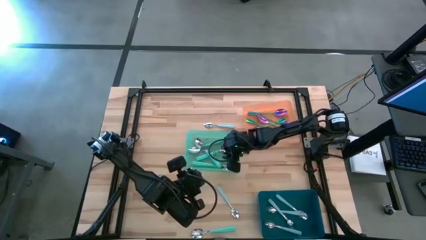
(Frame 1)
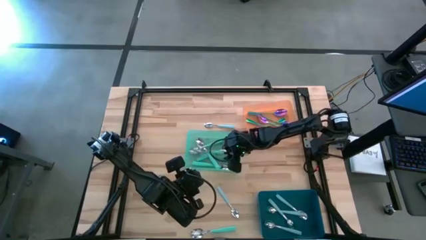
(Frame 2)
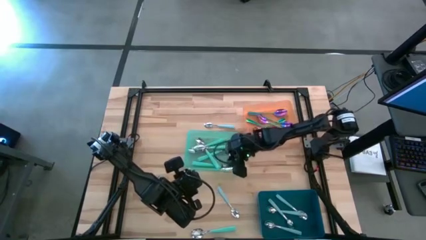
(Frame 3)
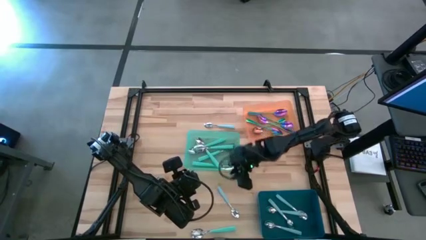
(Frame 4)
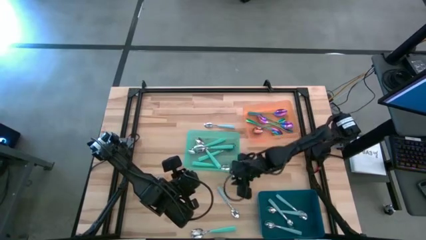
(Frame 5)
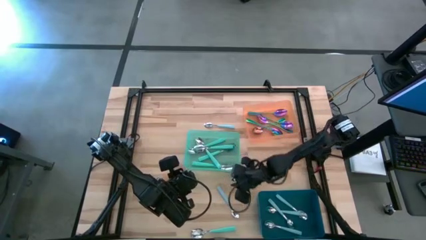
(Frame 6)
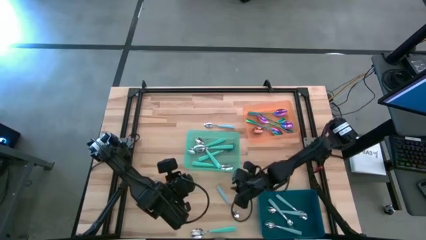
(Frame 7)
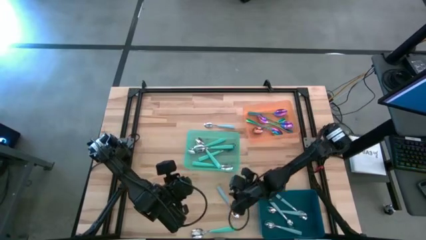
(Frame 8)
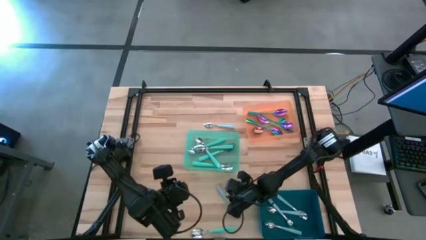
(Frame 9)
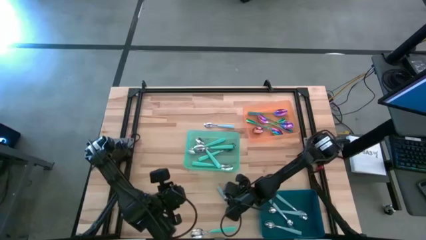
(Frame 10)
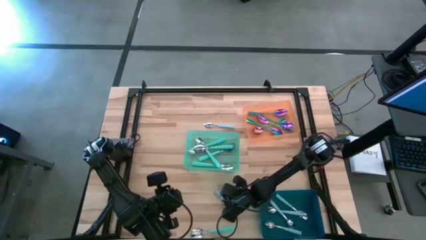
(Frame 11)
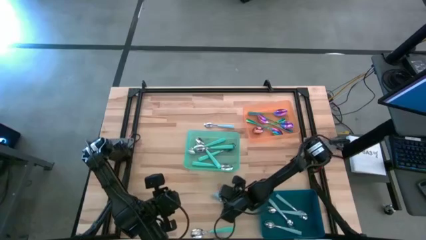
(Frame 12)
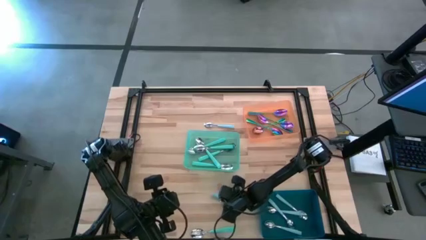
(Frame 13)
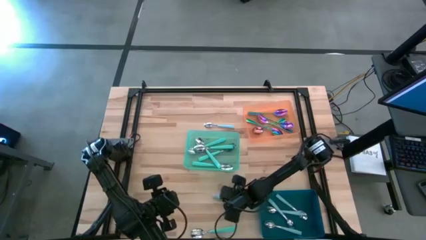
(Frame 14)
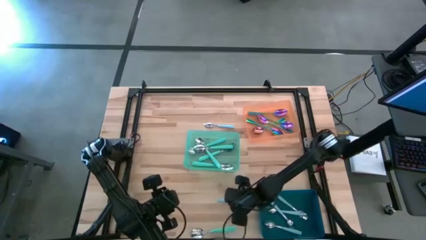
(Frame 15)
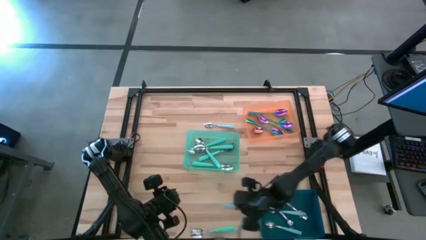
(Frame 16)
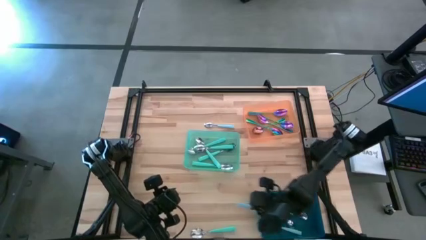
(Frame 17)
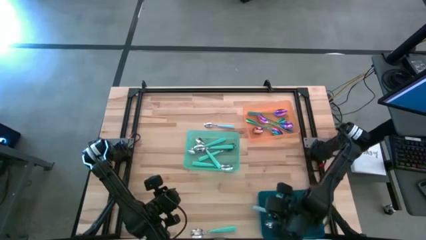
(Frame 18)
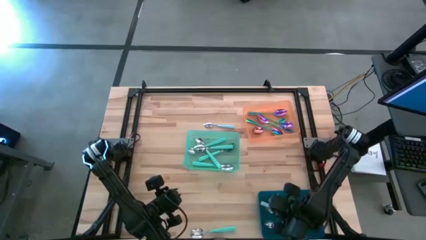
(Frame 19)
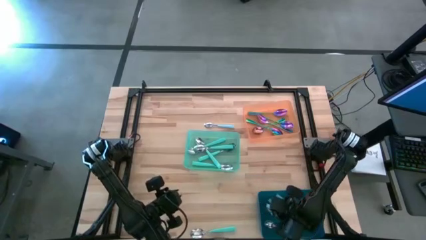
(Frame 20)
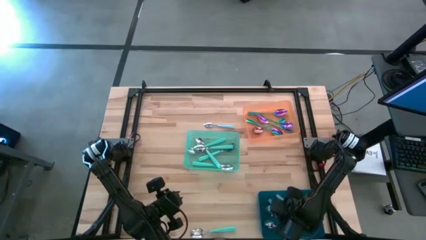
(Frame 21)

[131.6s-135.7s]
Task: Sort silverware by color (type)
Put the blue spoon into the blue bin

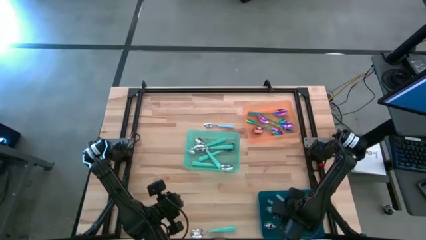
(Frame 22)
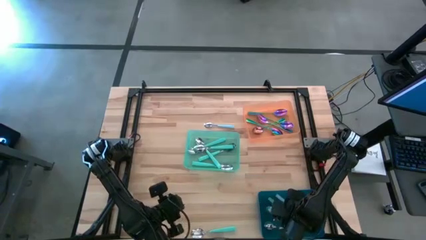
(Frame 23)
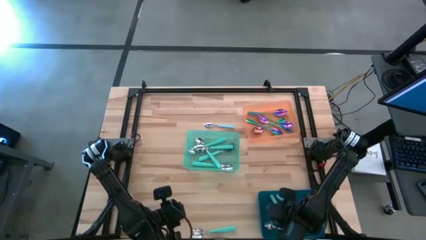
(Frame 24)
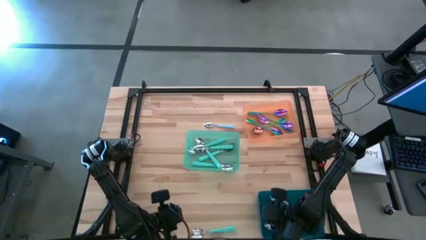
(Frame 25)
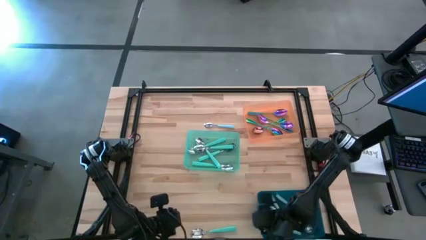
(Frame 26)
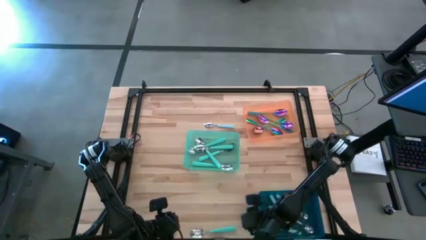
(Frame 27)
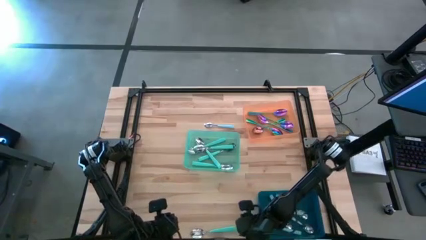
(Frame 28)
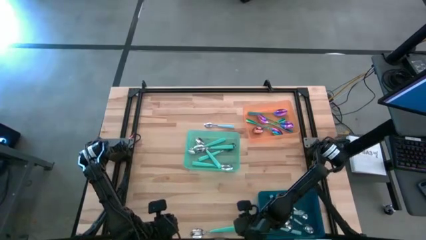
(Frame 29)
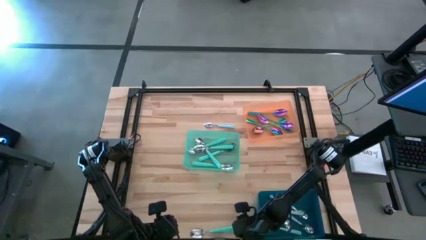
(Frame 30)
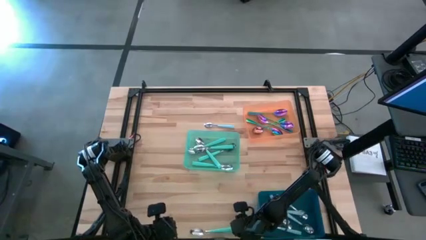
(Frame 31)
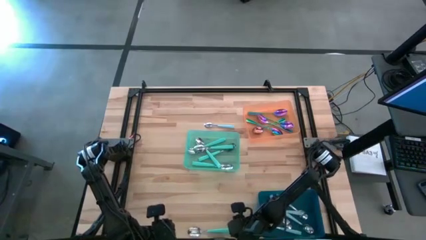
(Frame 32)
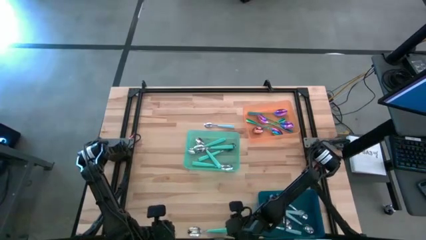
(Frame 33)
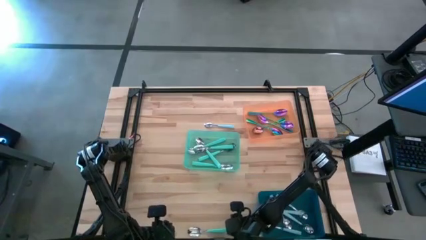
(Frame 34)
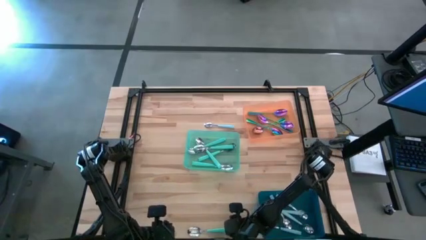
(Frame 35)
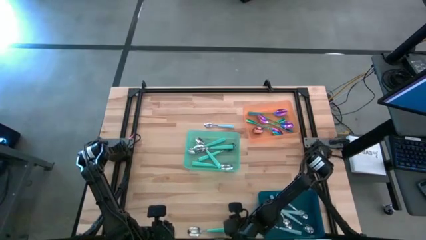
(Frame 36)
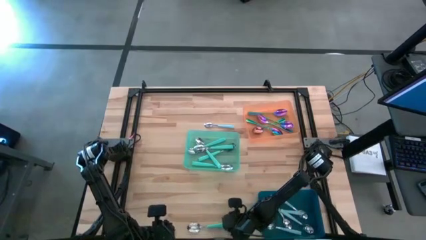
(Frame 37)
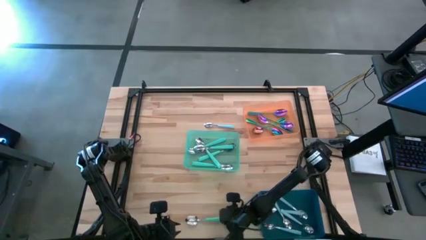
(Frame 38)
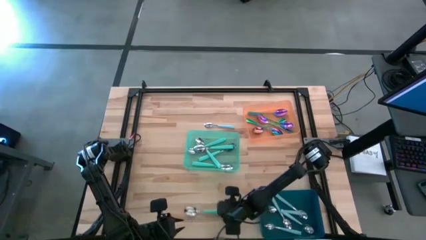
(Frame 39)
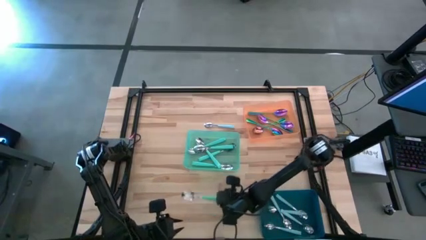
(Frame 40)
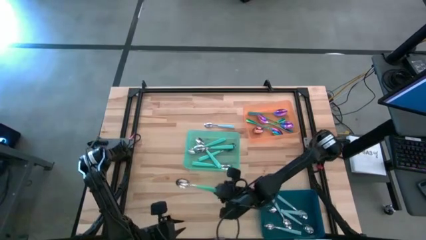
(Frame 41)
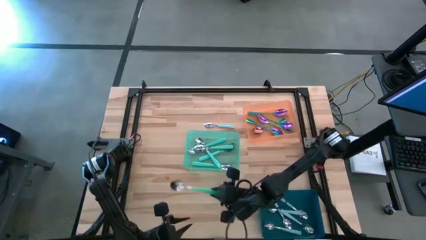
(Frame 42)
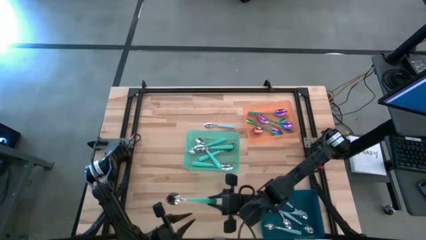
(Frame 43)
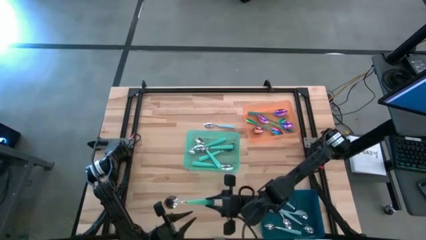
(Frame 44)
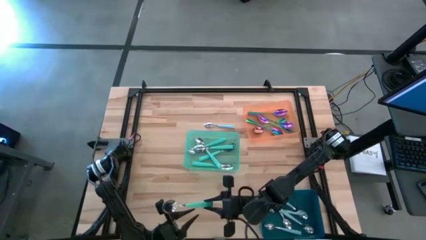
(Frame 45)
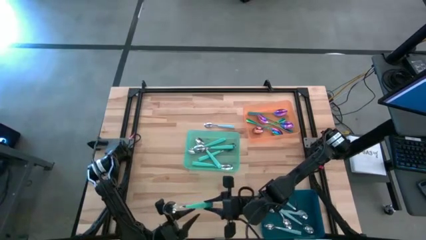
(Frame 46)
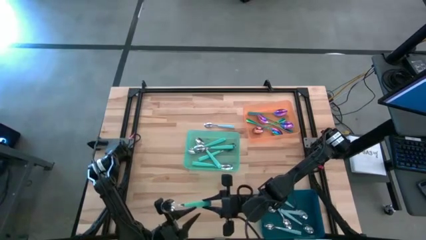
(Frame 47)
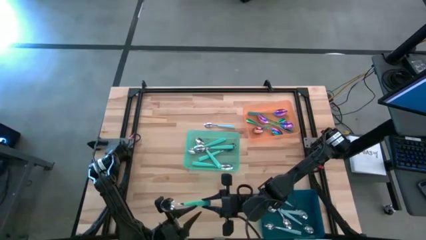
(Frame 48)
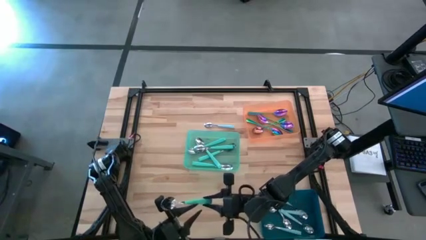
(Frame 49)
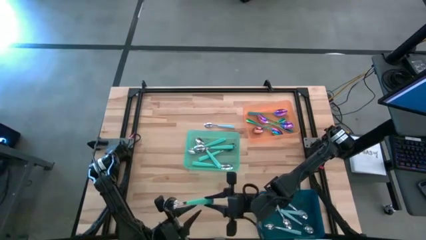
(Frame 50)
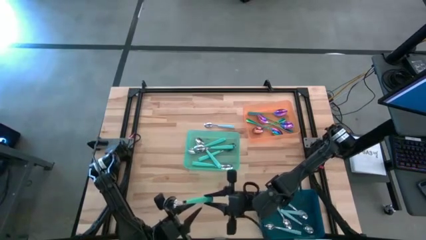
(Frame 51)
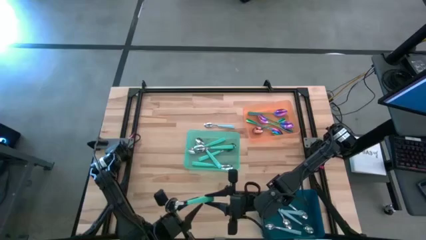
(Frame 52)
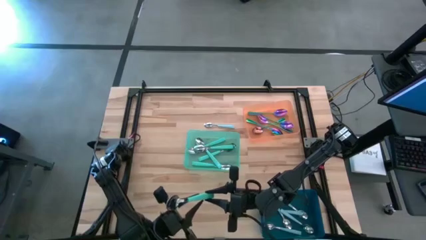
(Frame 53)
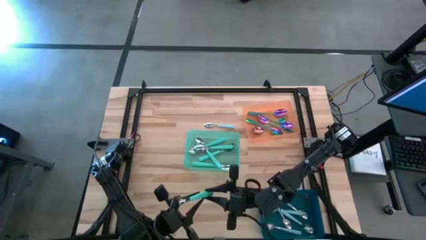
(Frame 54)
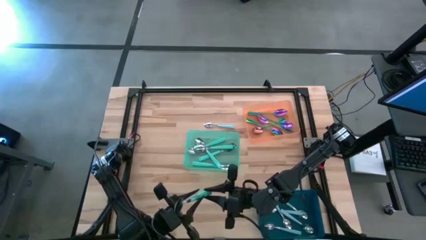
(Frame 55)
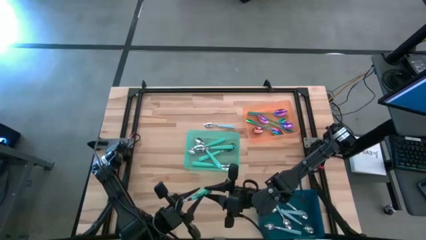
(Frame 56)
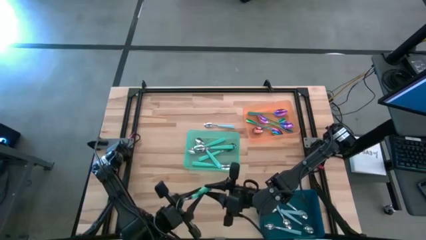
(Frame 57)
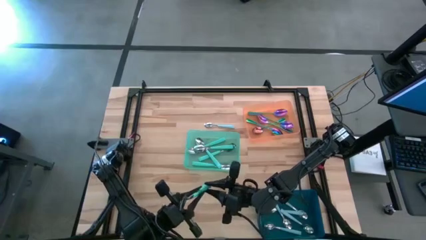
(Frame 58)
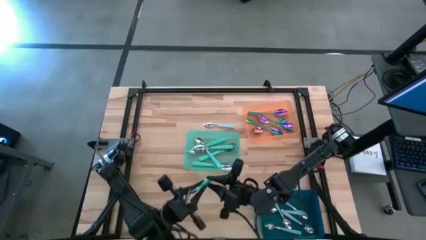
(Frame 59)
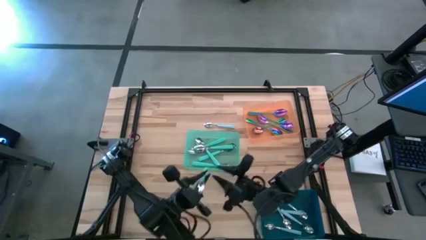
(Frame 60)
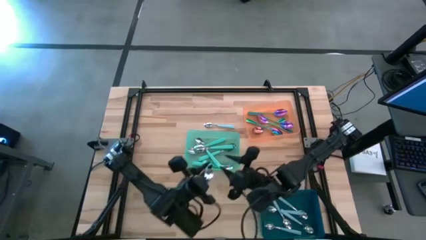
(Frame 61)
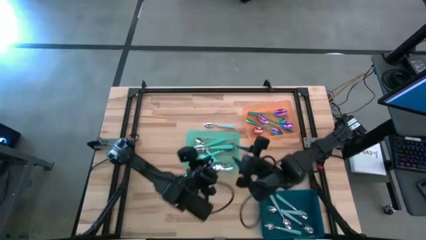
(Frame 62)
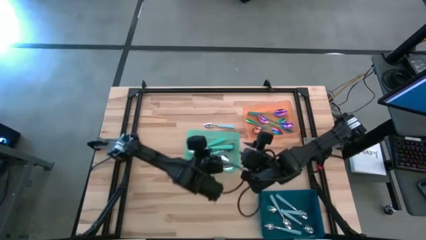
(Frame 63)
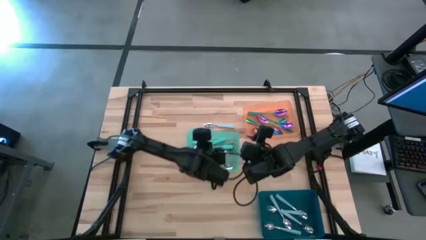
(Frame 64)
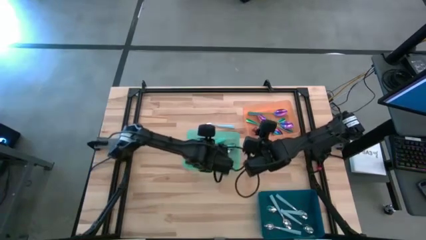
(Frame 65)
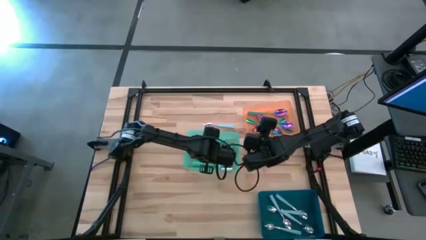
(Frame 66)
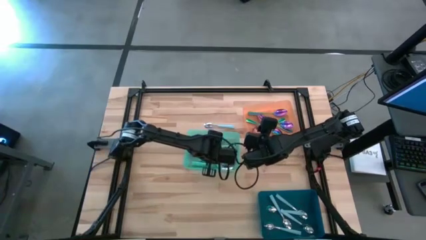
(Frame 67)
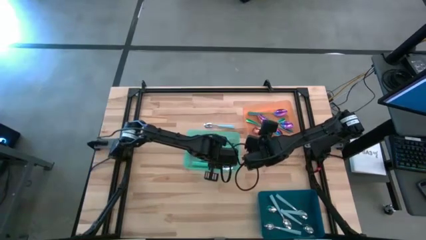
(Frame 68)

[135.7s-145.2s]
Put the green spoon into the green bin

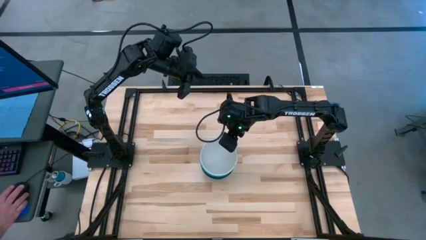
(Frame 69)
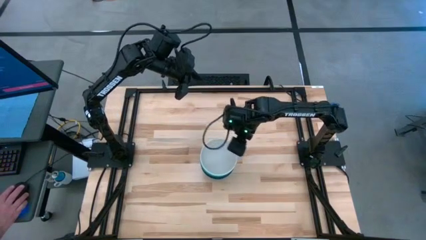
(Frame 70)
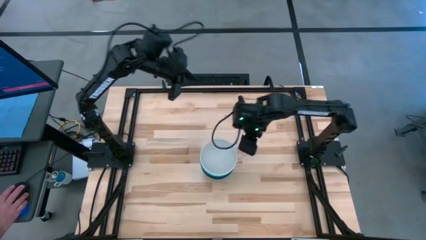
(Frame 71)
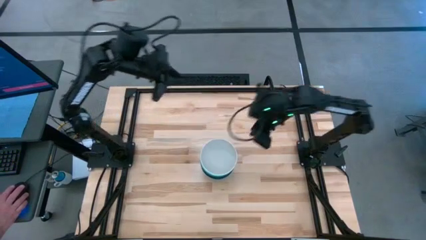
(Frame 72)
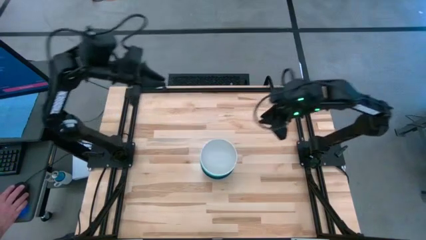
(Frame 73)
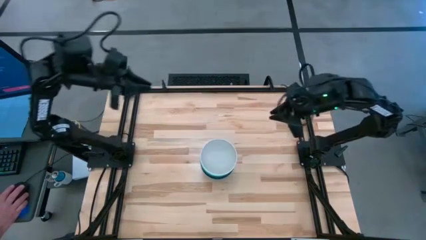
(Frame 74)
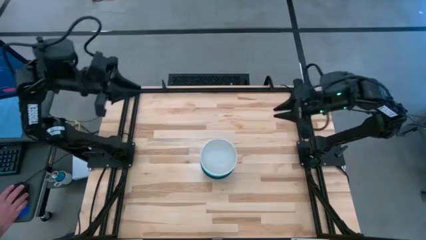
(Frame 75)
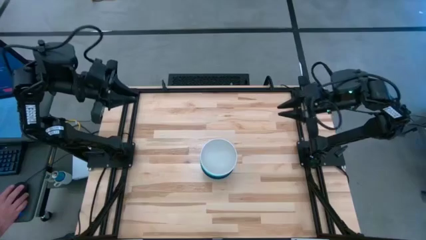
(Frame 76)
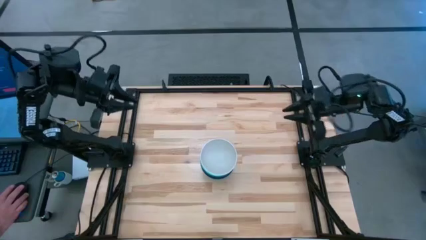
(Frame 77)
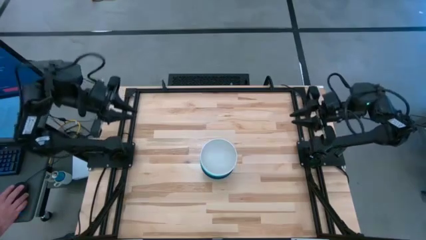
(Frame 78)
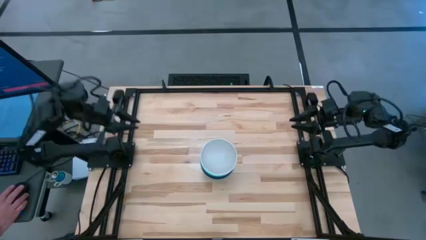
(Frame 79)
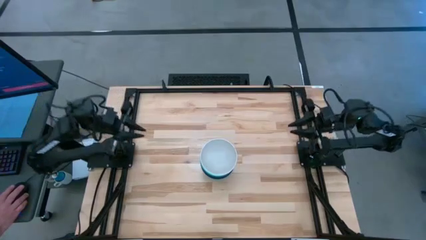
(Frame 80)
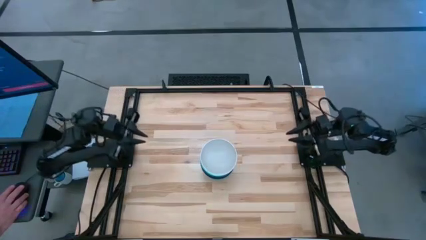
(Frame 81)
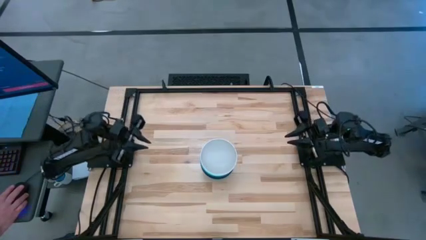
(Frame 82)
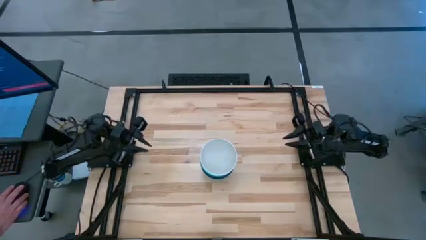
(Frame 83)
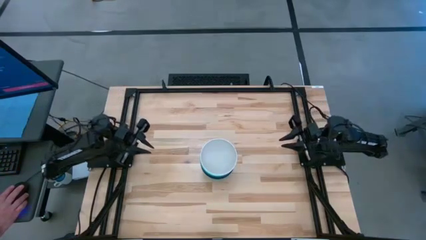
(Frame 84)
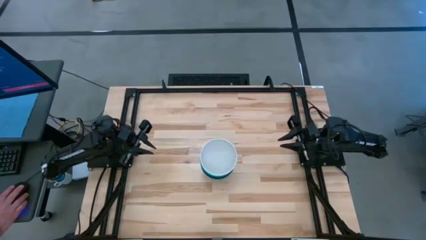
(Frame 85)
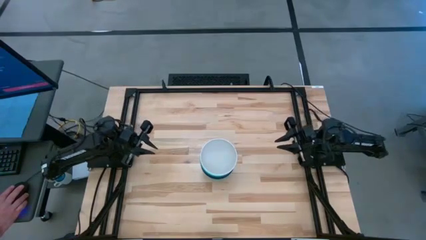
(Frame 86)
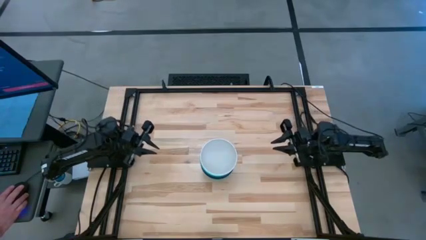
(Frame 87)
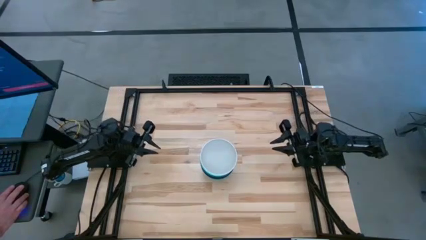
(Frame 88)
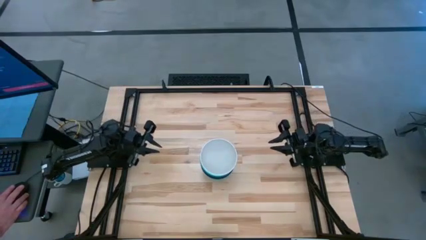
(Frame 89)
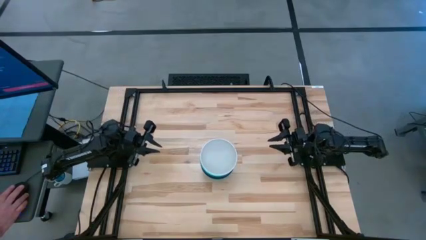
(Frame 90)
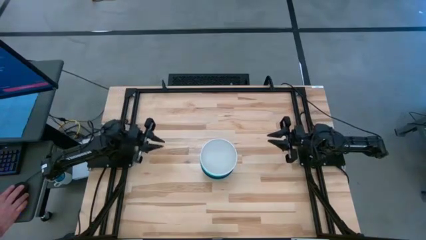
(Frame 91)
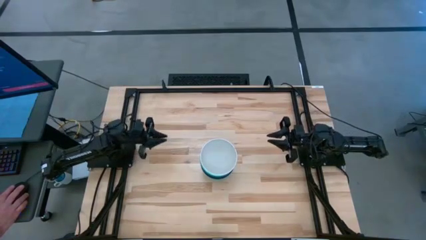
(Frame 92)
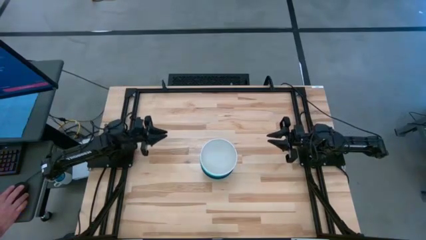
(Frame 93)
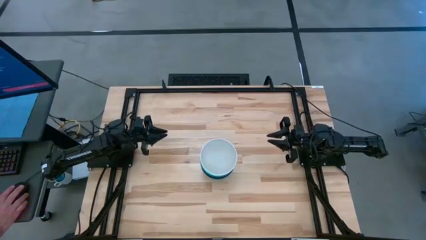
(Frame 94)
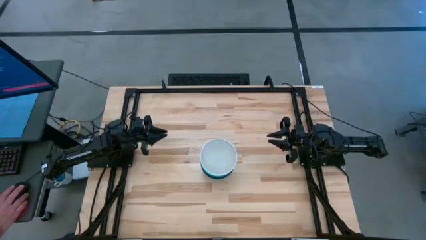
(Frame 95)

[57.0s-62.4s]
Task: Nest bowls inside each other
Return to Home Position
